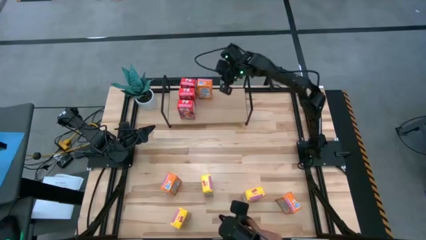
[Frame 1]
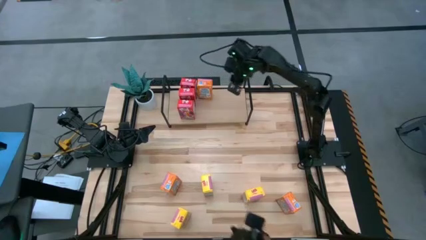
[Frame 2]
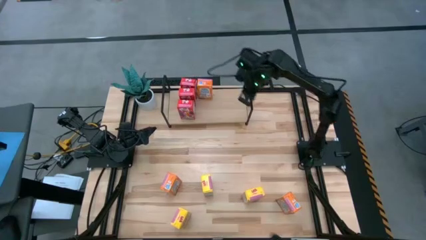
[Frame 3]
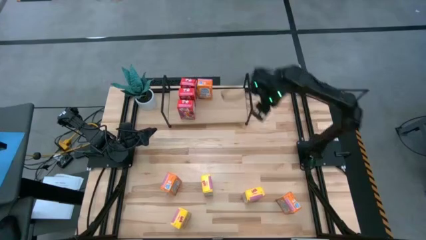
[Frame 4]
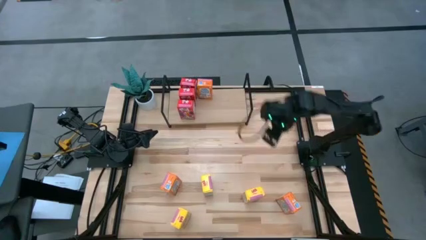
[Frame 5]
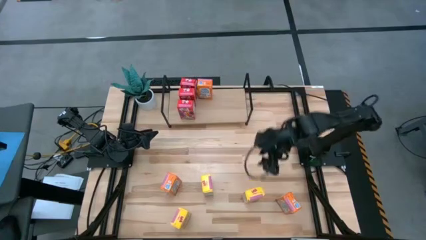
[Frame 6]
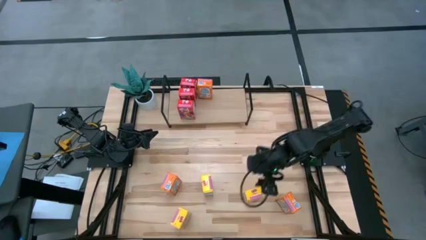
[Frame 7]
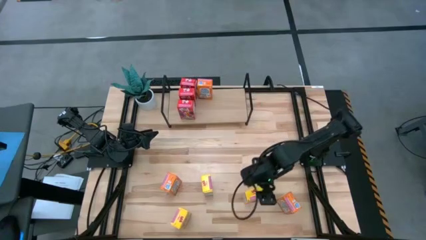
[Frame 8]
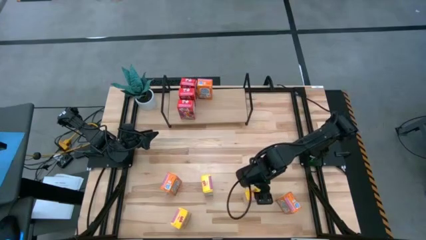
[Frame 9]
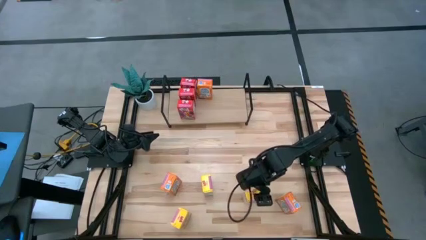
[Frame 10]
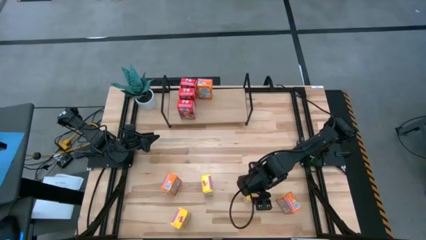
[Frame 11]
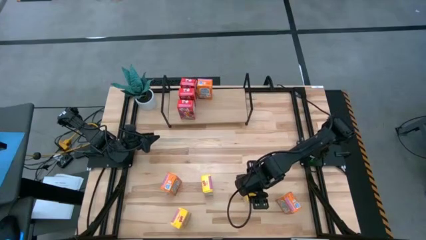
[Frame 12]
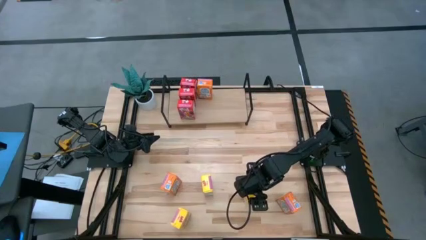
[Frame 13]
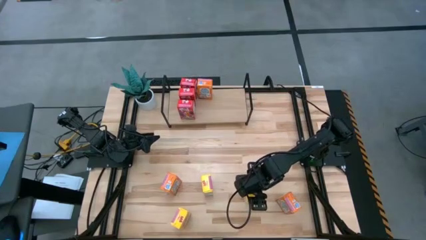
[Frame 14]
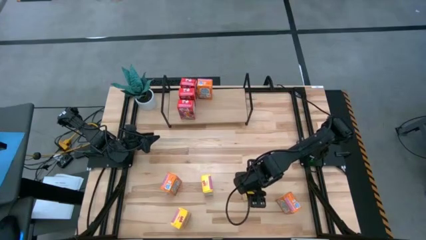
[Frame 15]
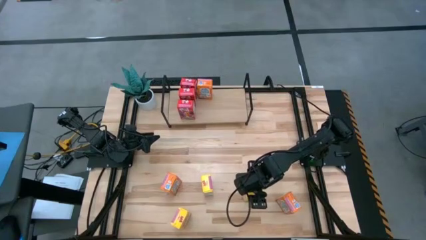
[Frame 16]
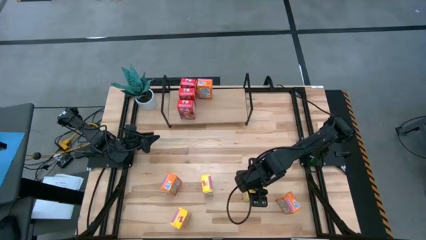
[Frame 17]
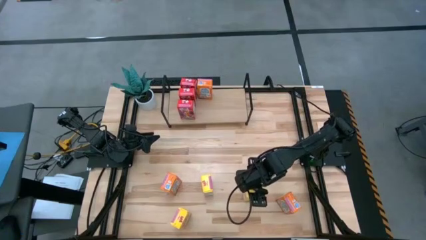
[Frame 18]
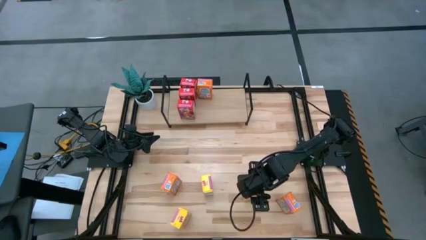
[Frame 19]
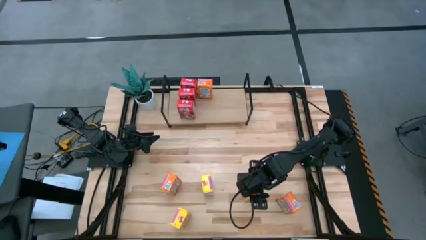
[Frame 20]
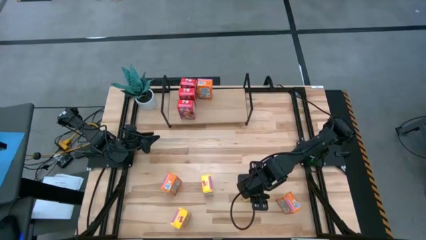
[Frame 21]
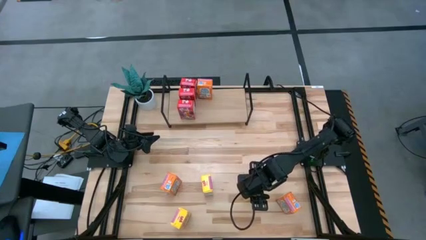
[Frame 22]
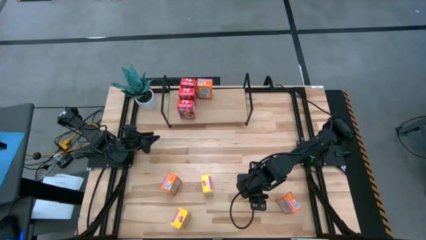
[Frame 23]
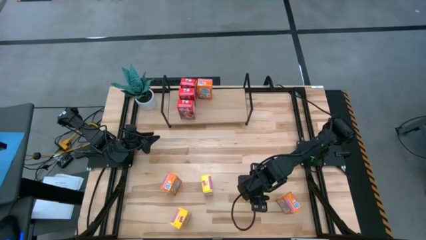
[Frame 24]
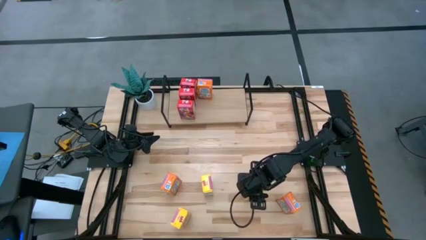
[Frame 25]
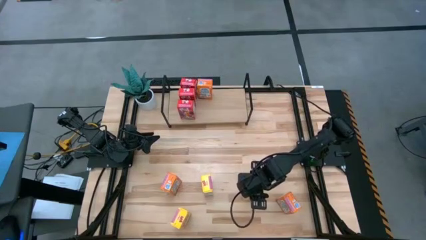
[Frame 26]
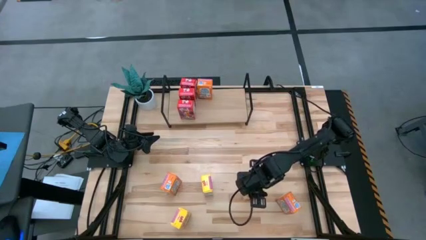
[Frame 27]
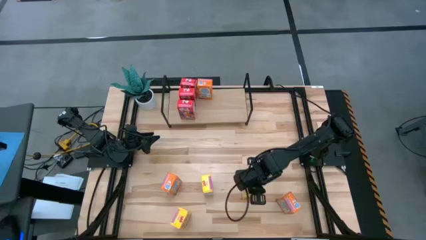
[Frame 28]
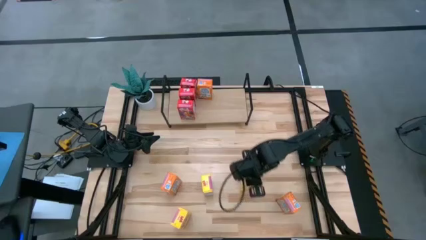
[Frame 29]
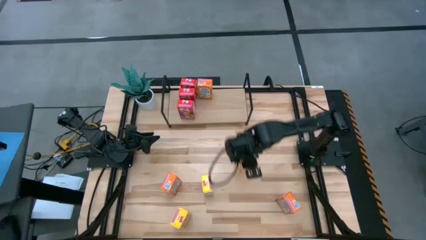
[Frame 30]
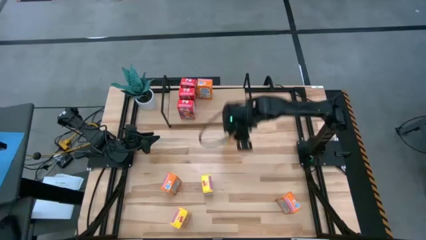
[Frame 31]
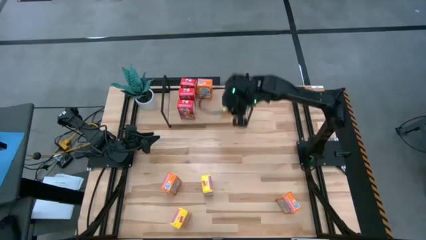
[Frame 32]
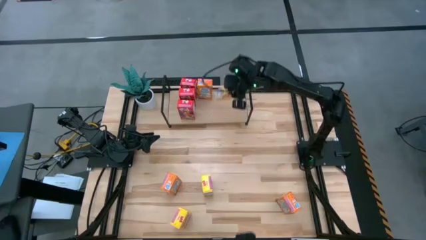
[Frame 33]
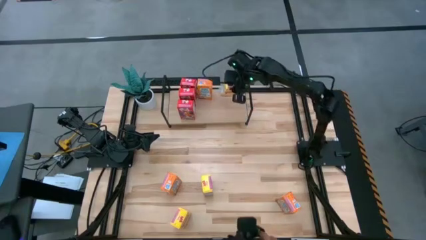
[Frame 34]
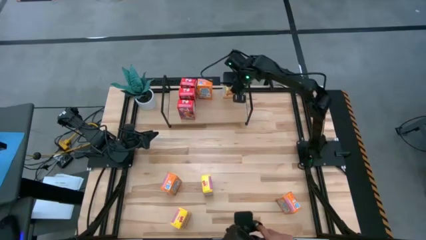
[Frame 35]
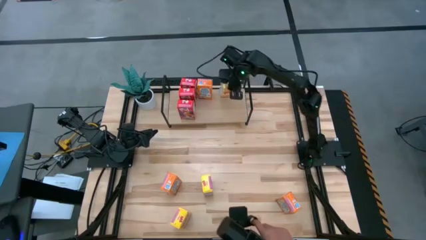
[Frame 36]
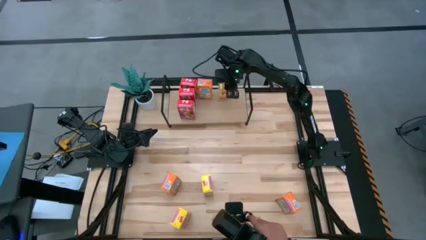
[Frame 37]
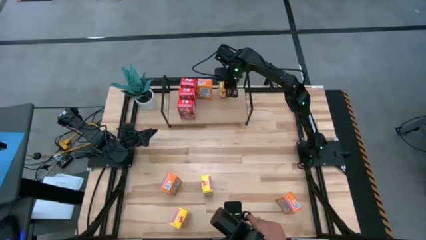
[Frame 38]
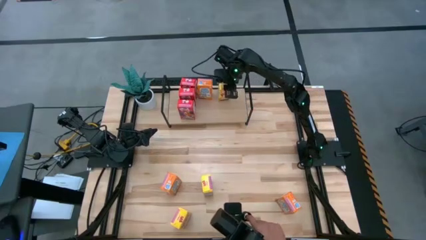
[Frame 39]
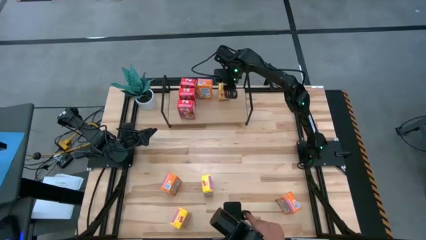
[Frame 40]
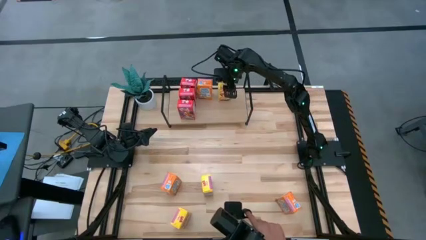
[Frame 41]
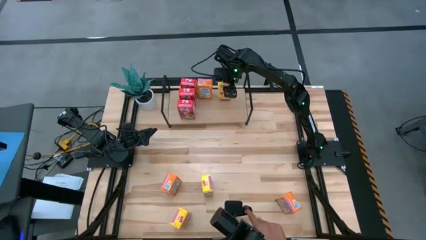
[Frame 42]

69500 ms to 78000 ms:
Task: Stack cereal on shelf
Put the top right yellow cereal box on the shelf

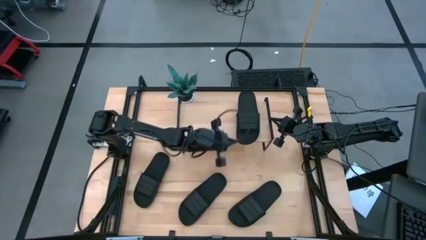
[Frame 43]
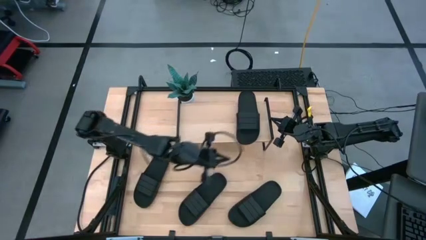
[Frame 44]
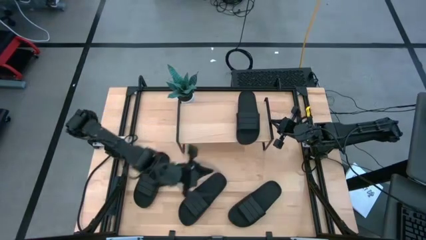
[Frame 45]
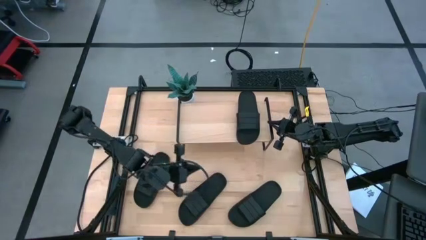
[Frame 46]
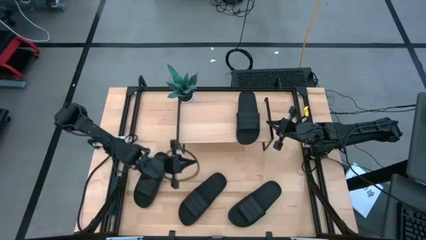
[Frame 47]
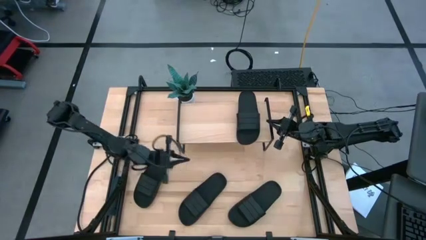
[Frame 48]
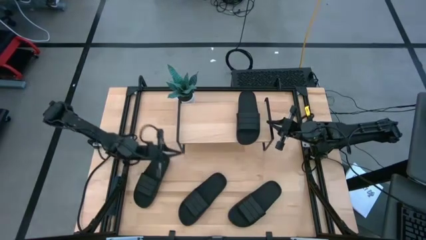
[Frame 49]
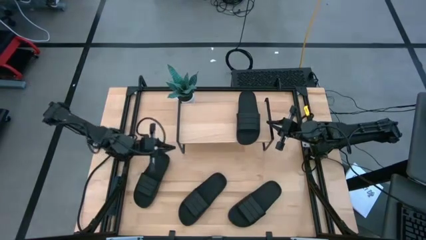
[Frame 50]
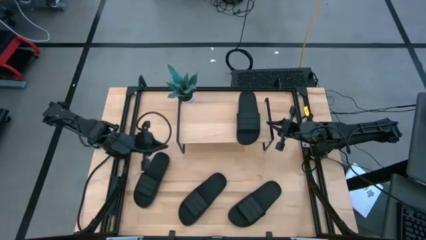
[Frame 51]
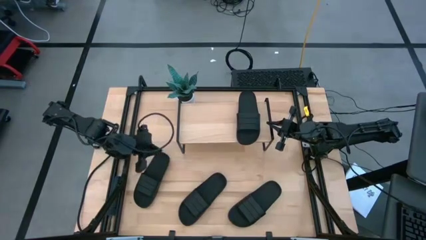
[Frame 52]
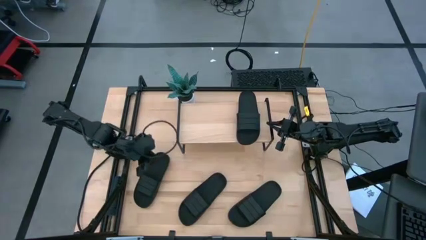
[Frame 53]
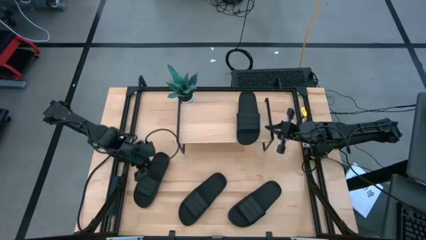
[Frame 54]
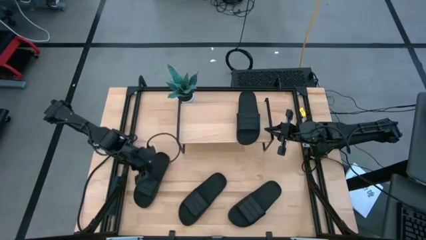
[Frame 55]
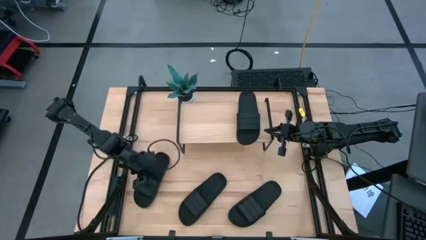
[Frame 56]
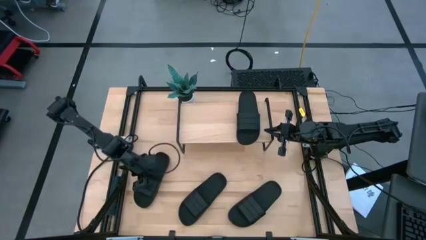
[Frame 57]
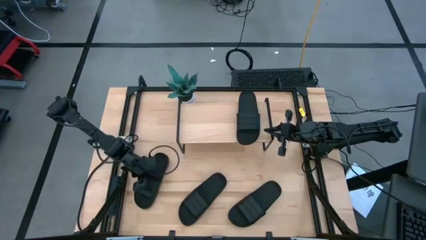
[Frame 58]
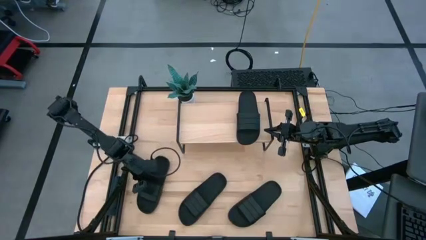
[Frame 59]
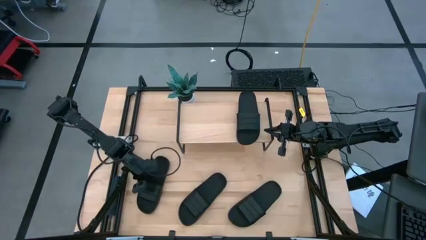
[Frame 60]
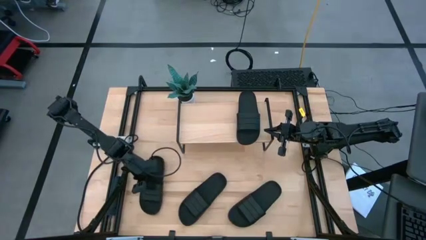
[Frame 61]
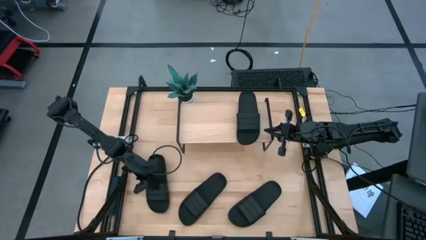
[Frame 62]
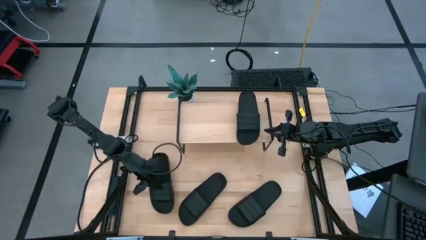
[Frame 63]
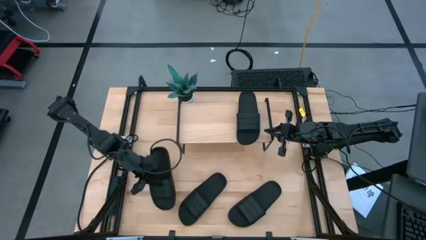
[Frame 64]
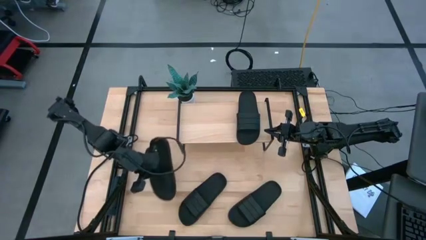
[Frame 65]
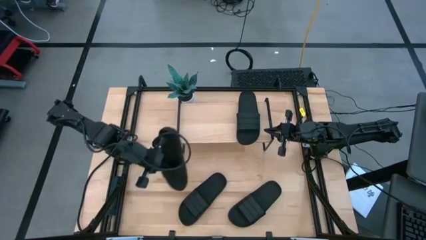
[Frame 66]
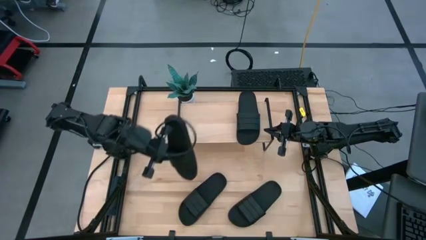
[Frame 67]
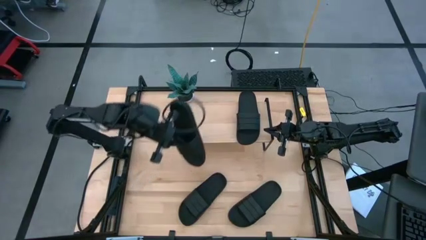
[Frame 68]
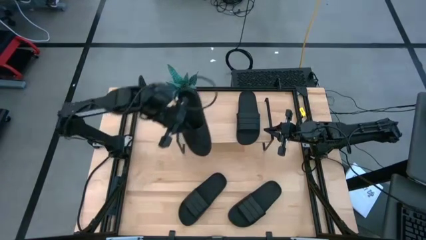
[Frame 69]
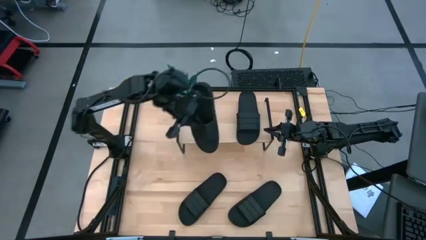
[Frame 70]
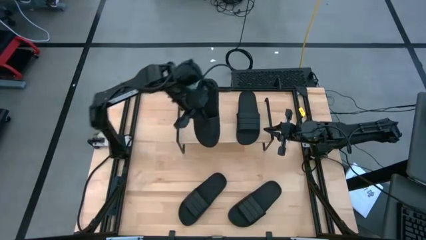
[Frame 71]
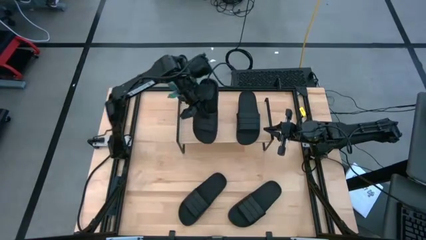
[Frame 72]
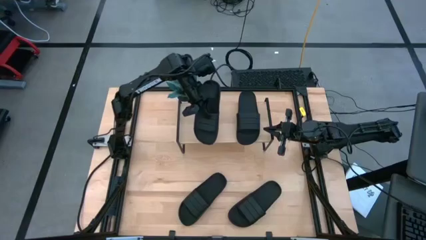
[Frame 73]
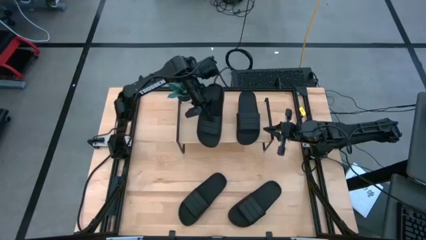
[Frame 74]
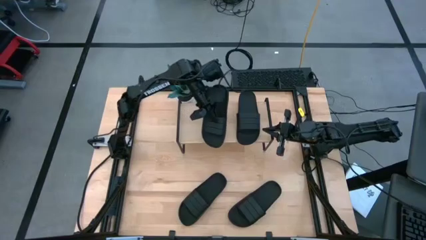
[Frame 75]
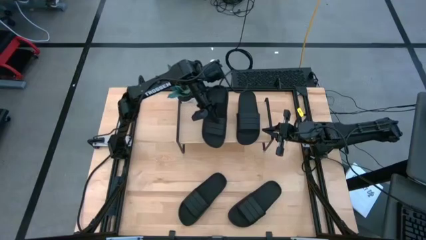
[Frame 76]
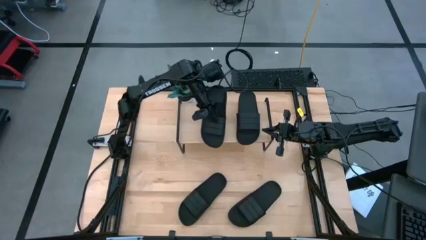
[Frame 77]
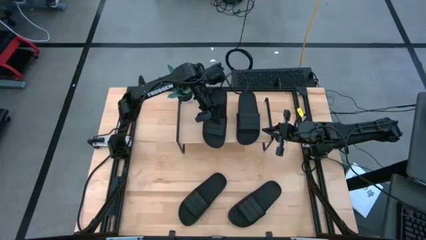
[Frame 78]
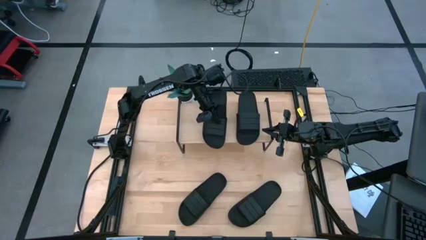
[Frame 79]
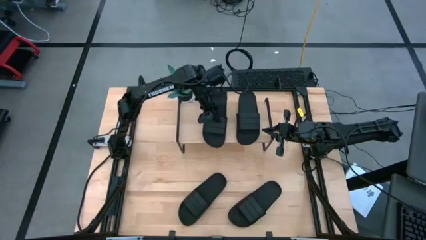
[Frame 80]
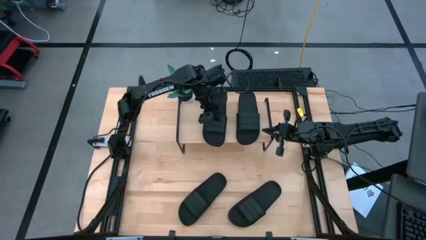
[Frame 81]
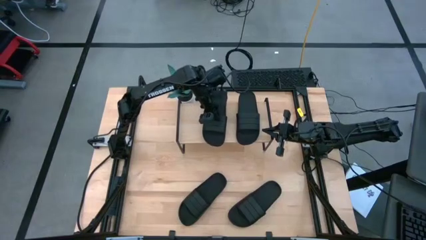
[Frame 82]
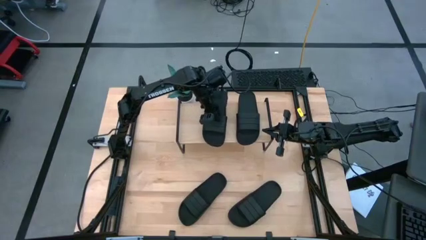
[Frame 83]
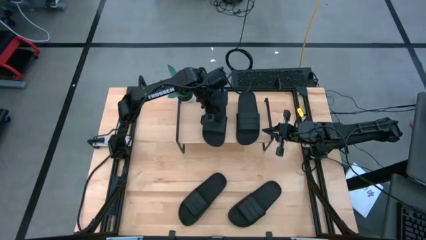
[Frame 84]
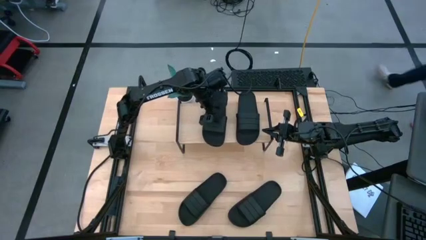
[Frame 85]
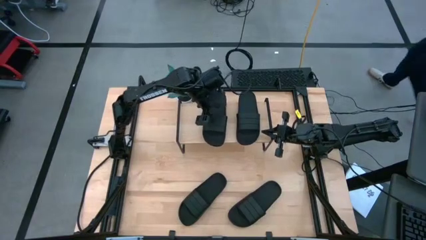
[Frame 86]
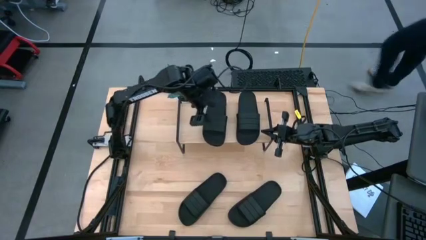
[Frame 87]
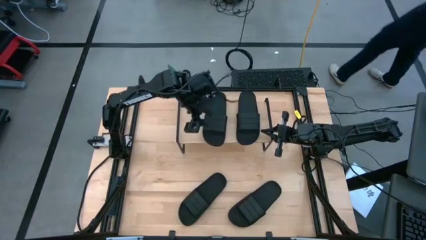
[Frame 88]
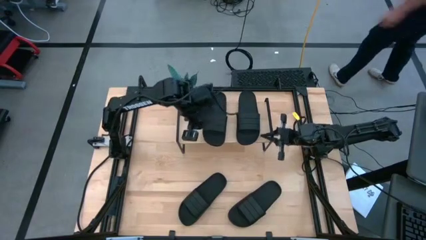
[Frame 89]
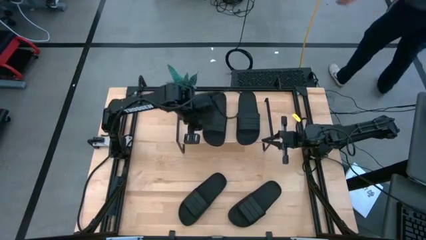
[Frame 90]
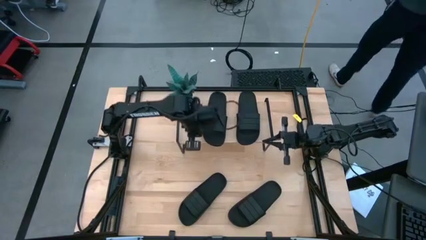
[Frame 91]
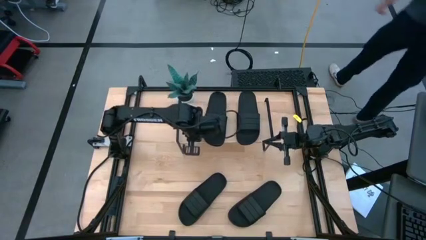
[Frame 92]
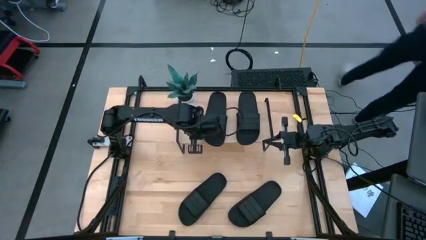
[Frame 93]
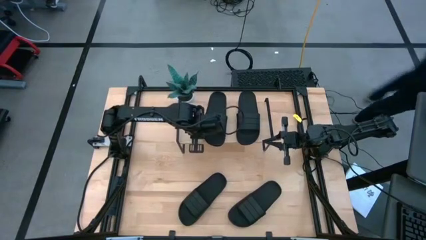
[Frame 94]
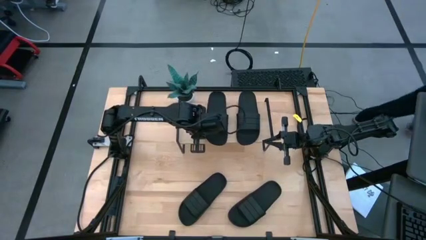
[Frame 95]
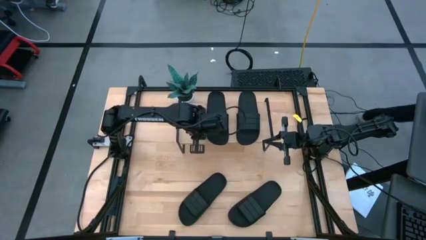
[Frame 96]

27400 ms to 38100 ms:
Task: Pick and place slides into the shelf
Put the left slide on the shelf
